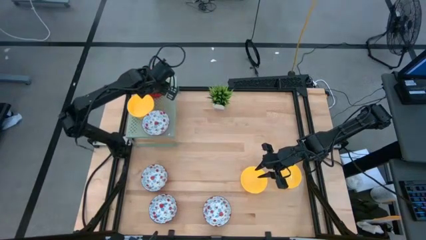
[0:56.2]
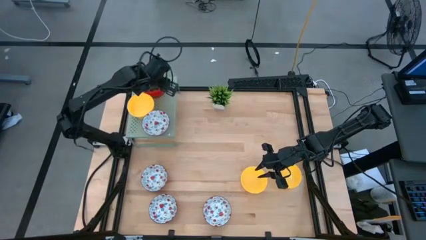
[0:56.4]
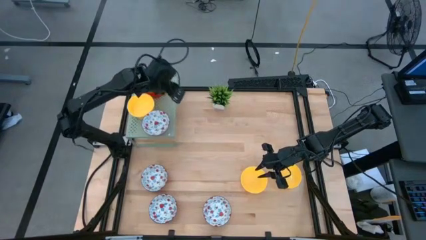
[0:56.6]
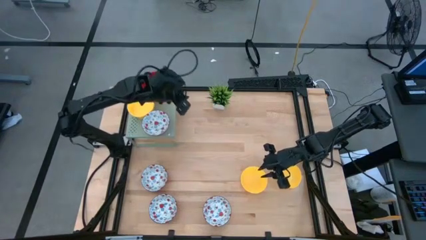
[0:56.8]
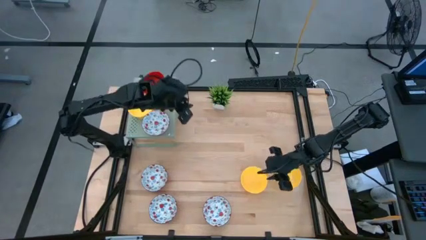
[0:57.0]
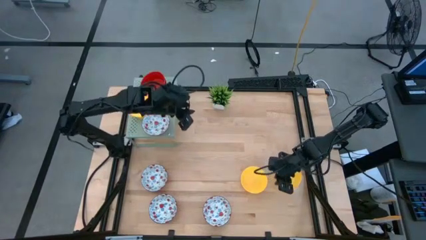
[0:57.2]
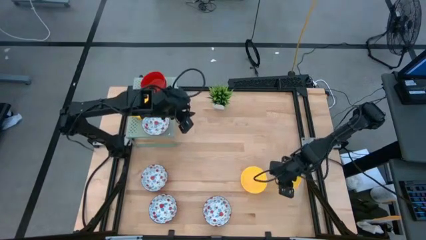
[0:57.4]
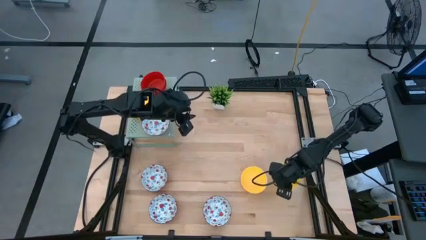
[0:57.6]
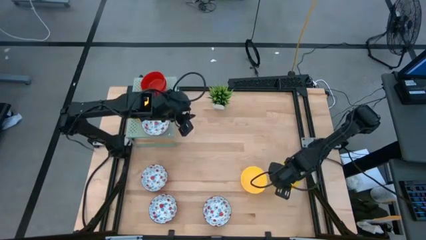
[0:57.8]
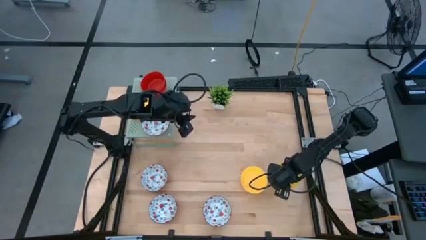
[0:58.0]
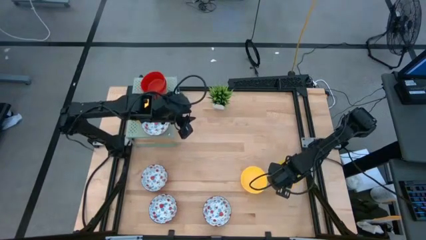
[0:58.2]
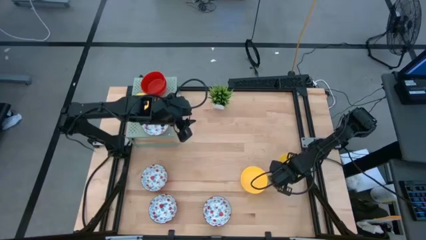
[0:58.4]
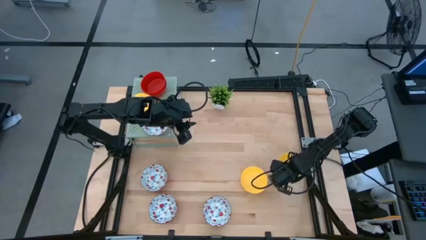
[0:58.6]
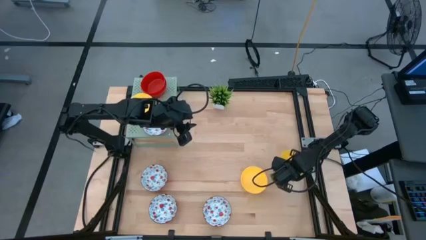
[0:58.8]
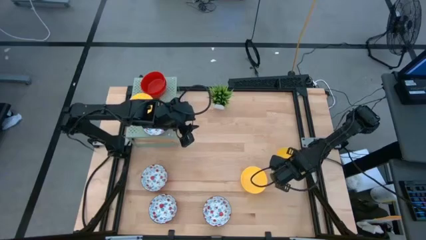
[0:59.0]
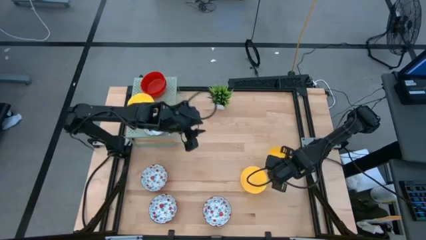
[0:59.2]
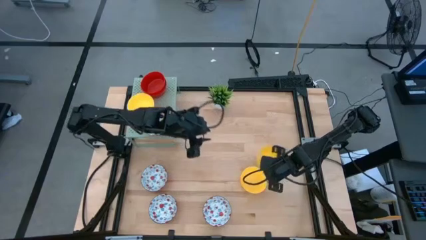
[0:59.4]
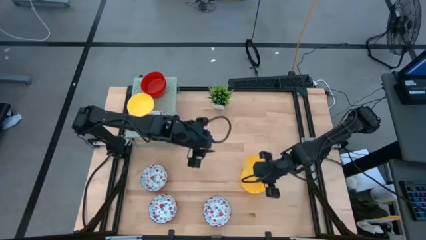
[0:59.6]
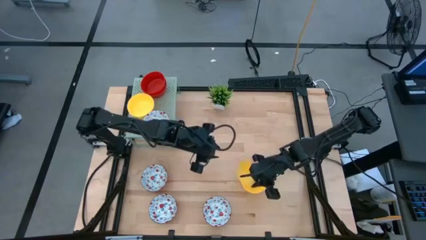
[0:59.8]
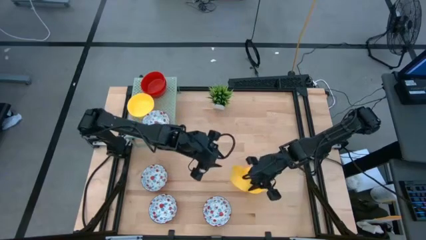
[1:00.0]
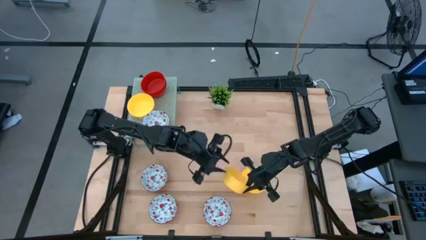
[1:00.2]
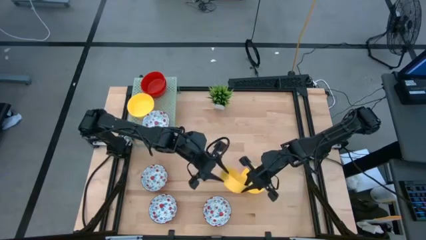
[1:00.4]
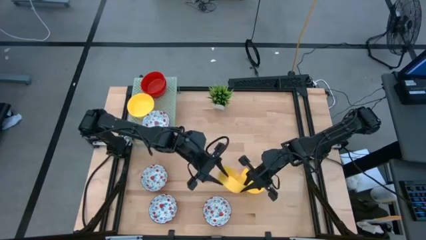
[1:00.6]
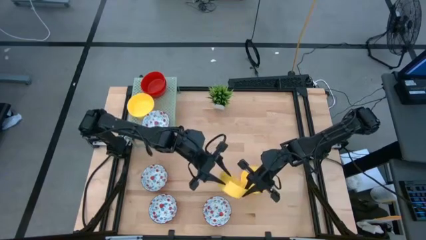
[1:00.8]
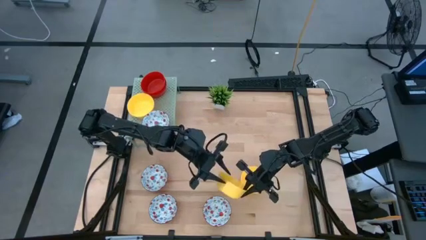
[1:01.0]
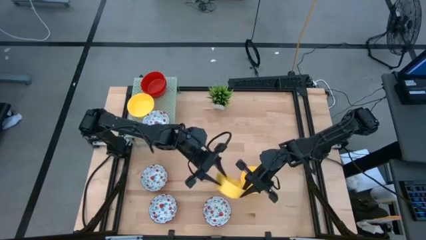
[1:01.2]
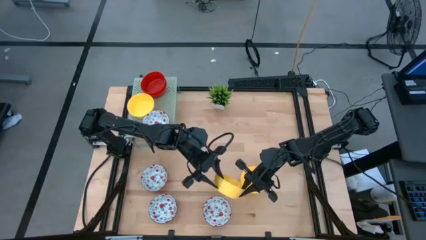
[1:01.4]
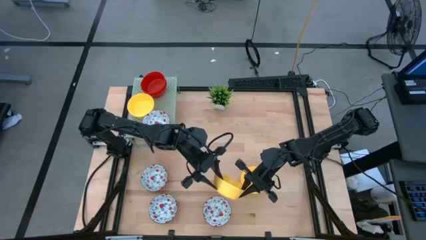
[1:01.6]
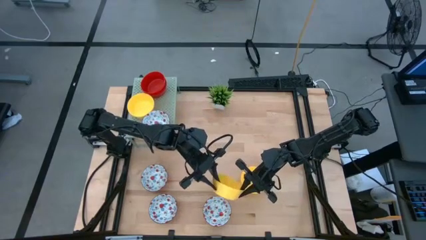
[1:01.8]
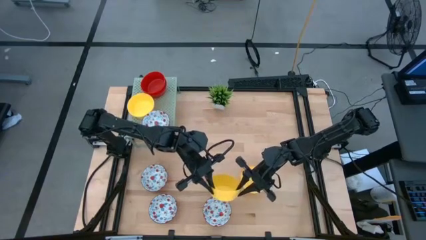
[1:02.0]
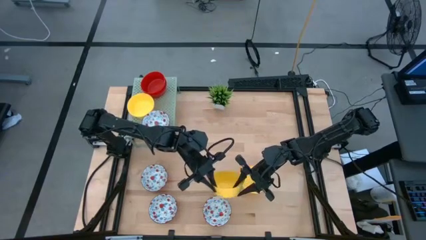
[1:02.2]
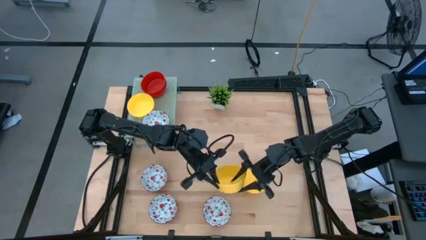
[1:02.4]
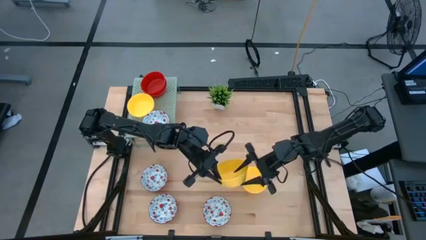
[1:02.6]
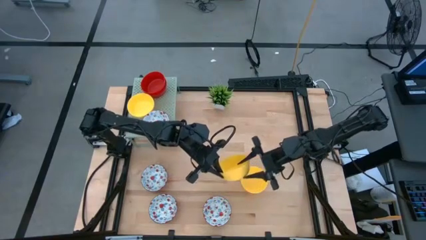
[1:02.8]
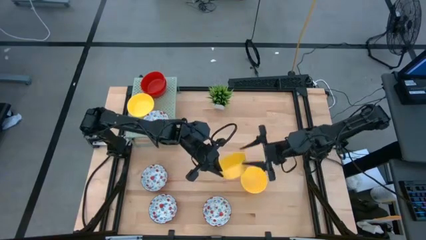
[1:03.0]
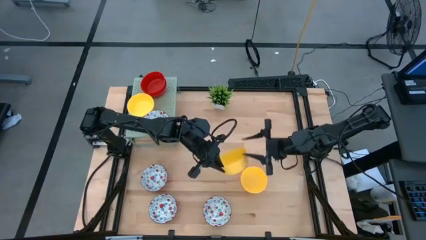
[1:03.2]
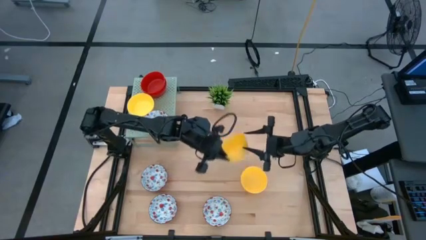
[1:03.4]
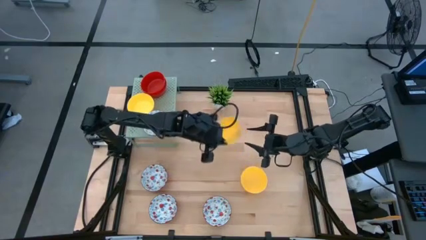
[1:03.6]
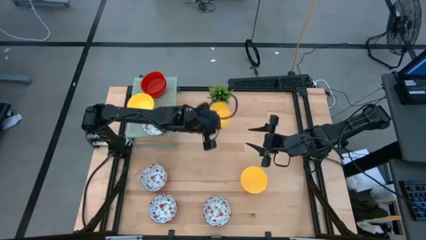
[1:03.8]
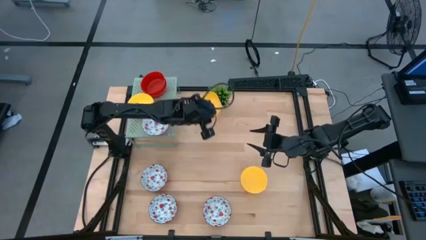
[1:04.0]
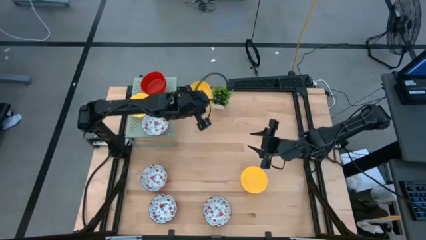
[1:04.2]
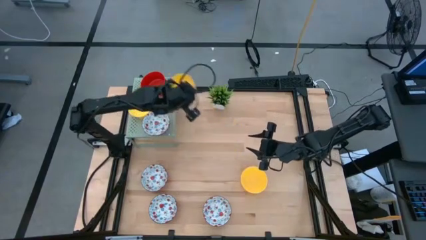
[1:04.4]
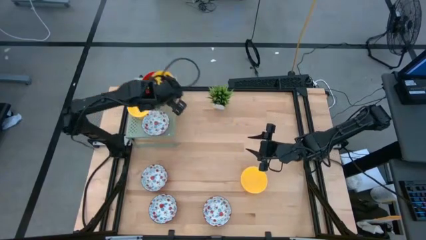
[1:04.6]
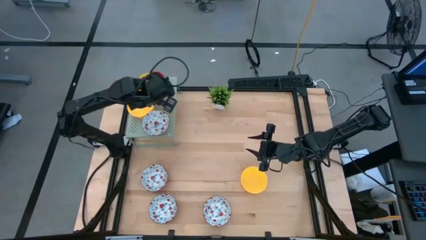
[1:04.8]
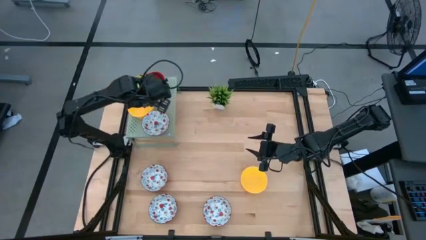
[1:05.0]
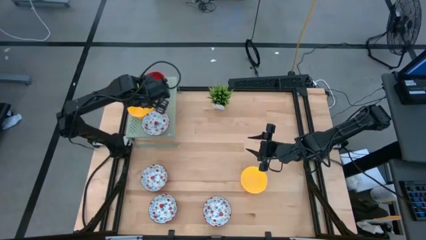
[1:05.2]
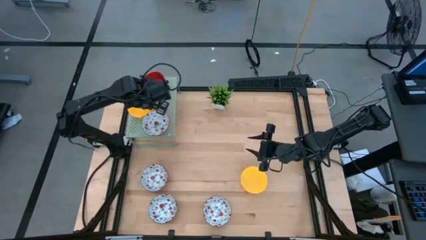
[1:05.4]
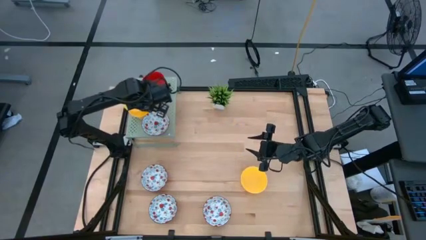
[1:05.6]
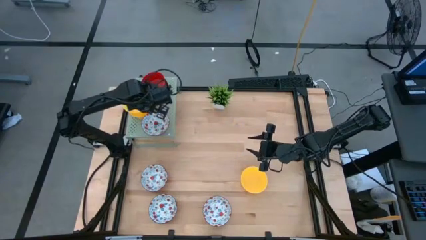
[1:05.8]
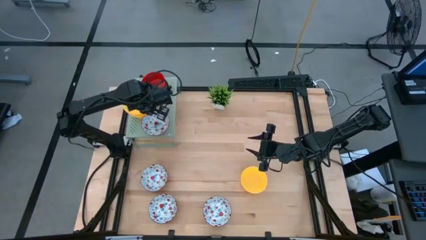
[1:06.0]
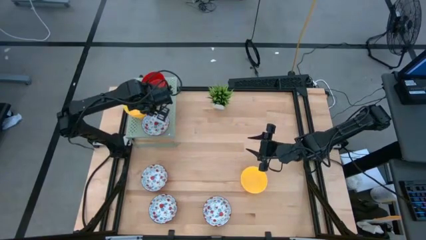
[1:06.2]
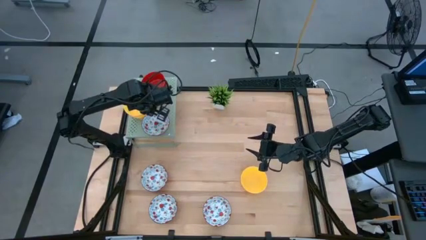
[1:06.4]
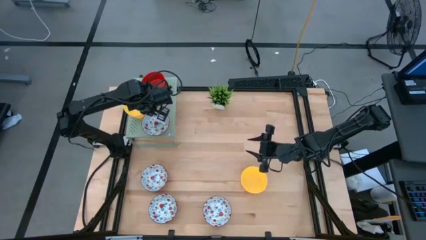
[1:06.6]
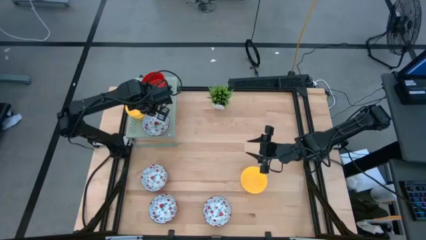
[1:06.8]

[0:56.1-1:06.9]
Task: Pick & Place Mini bowls
Stack the yellow bowl on the yellow bowls on the shelf

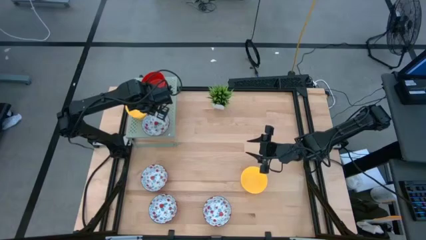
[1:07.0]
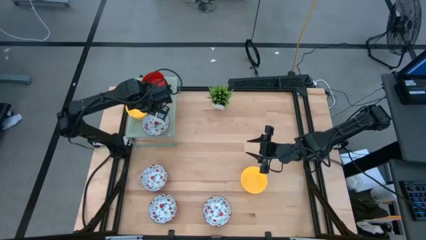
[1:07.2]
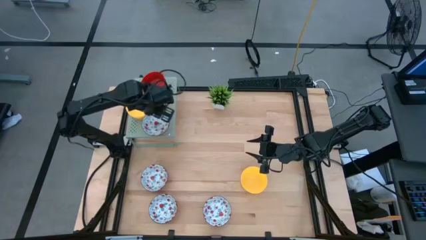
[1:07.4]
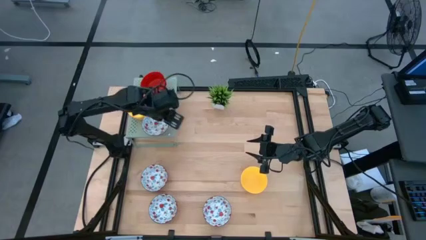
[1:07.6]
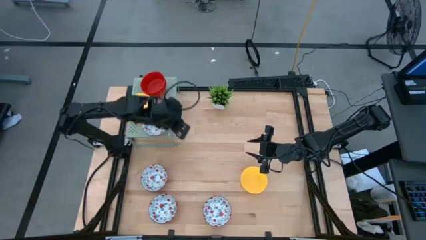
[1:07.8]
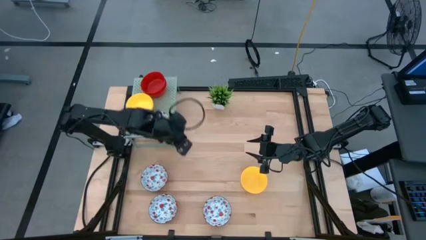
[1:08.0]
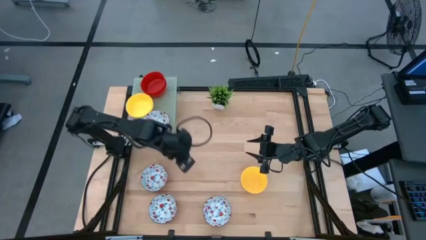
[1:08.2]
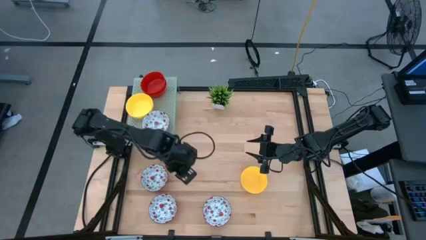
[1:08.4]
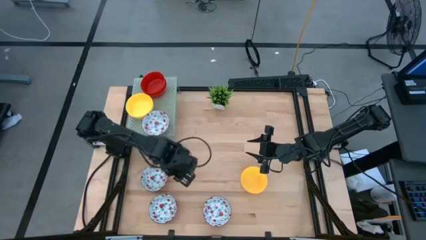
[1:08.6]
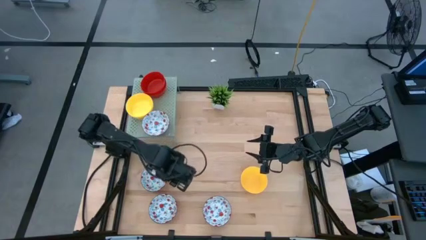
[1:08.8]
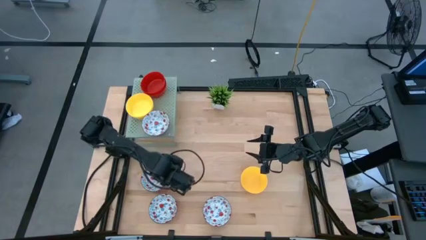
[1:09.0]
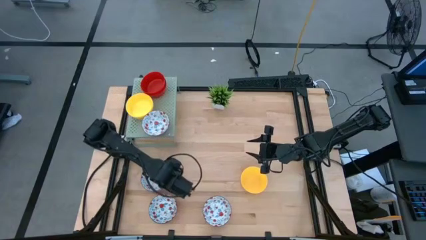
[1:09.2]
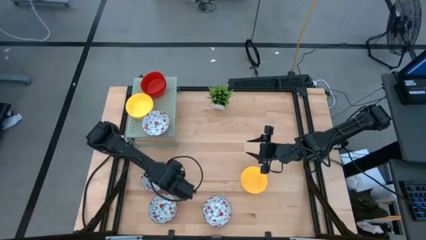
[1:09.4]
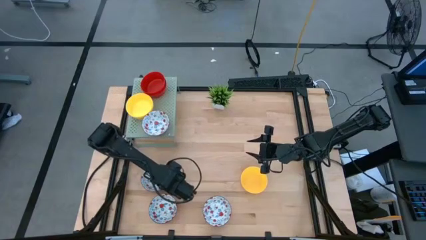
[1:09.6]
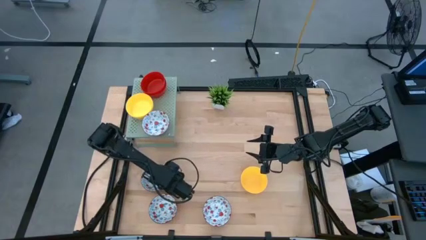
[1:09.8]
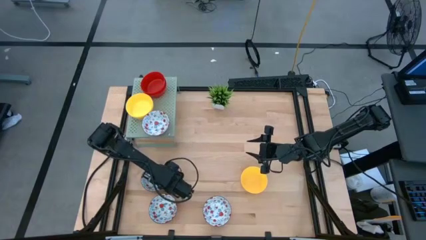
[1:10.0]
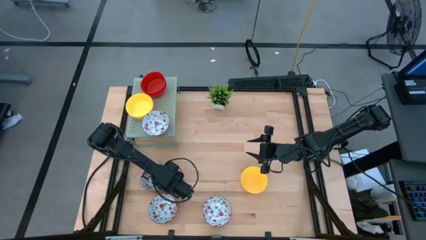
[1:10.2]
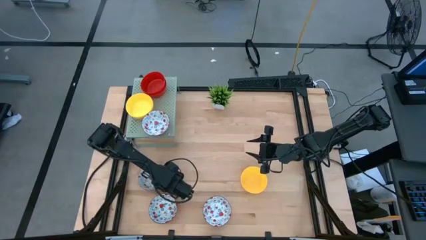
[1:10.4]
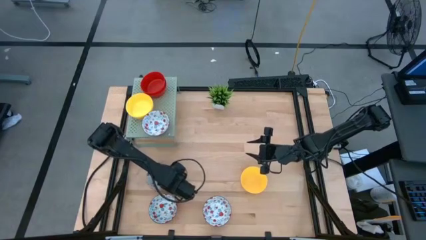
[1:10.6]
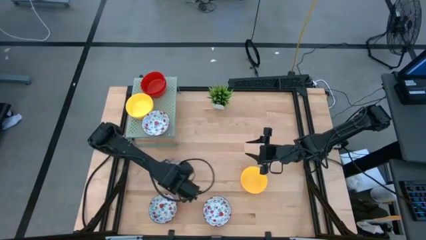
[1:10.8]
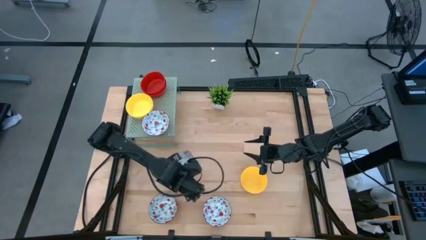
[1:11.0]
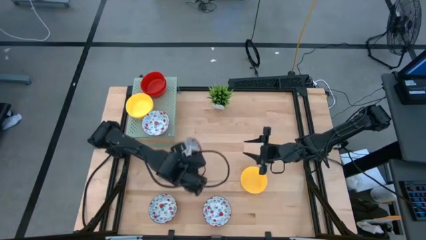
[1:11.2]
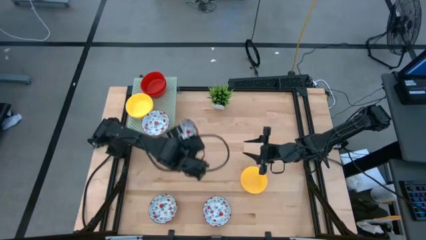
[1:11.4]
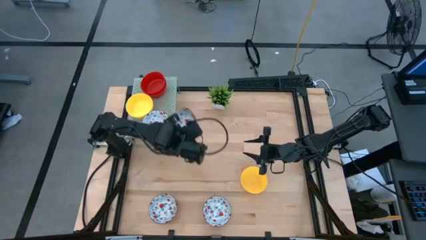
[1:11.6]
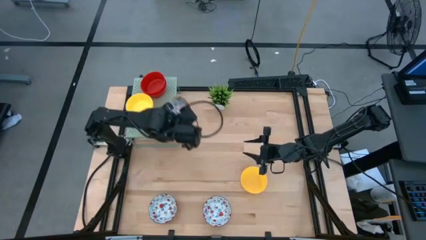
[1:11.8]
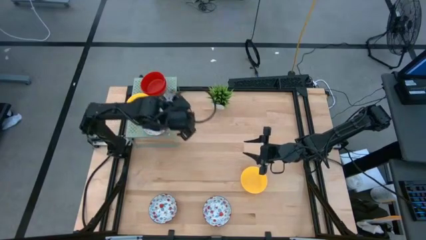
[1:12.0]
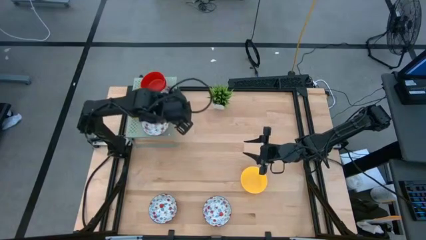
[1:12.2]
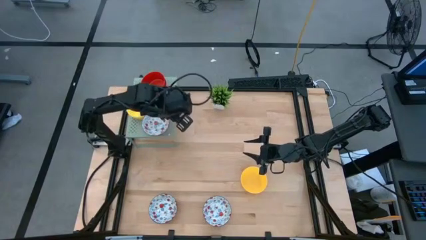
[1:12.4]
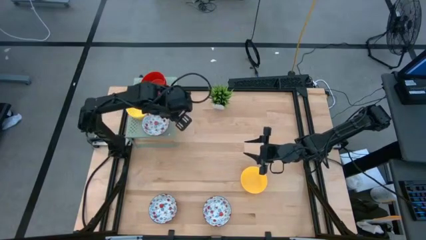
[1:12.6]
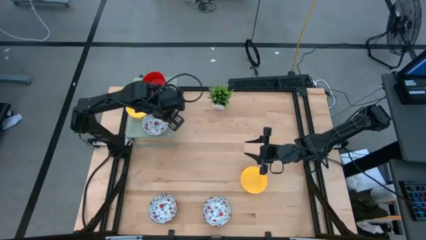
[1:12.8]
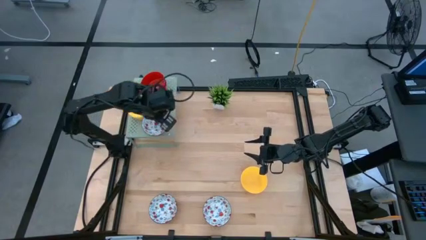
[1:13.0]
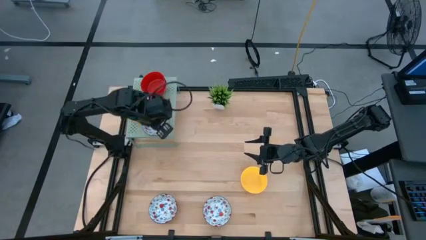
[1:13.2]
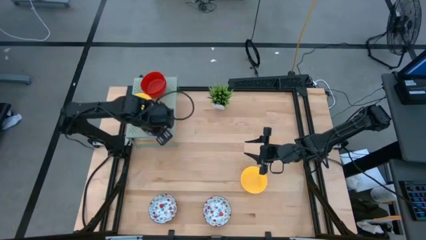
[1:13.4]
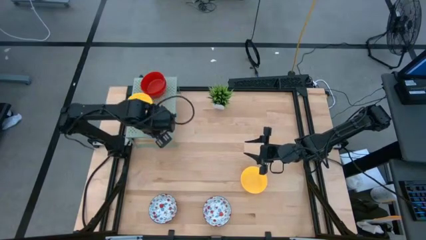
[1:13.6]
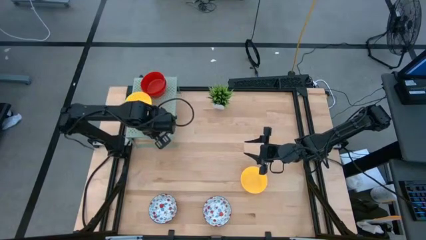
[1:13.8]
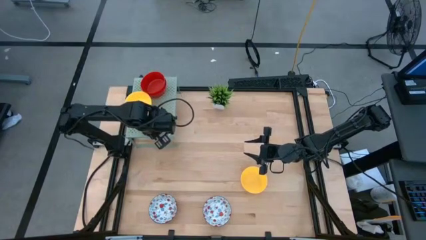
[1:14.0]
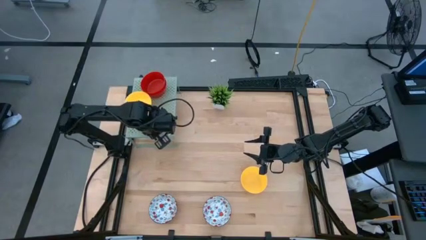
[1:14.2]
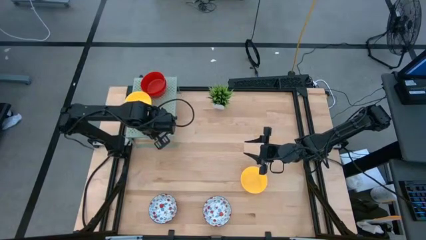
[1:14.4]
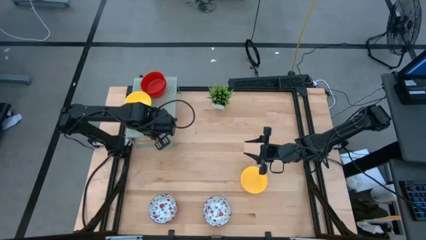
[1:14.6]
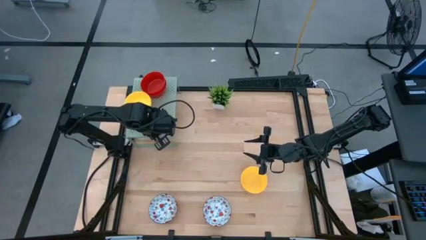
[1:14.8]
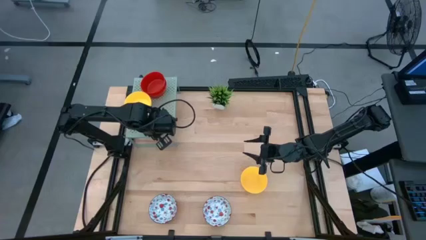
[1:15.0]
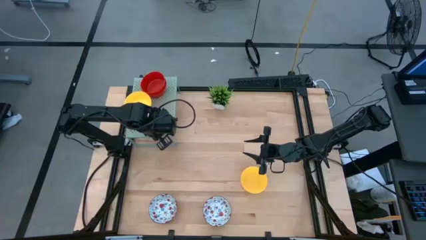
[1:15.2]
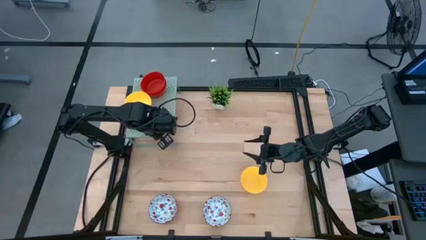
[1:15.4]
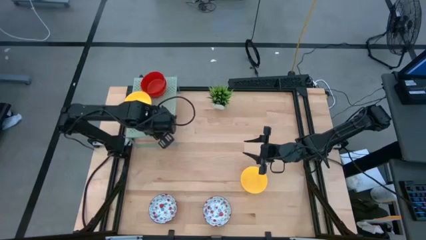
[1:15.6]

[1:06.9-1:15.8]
Stack the red and white bowl on the red and white bowl on the shelf
